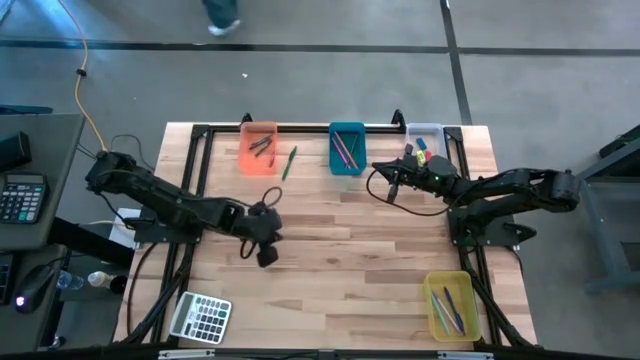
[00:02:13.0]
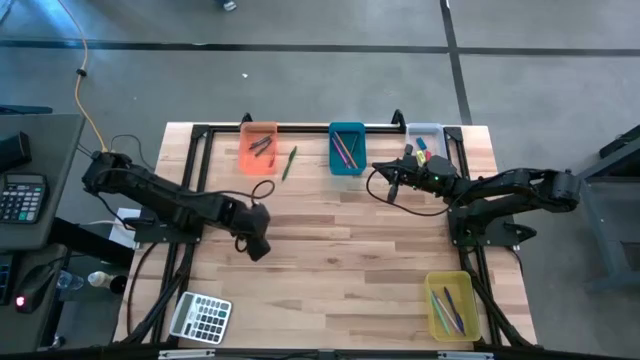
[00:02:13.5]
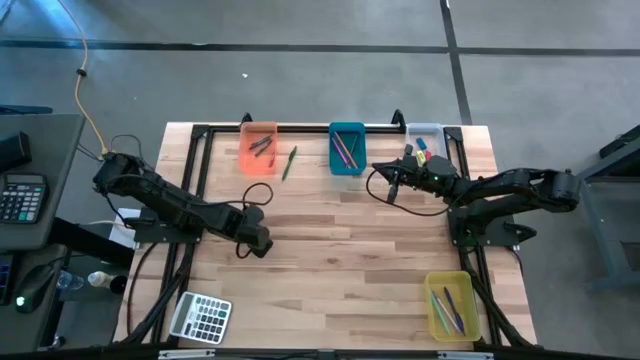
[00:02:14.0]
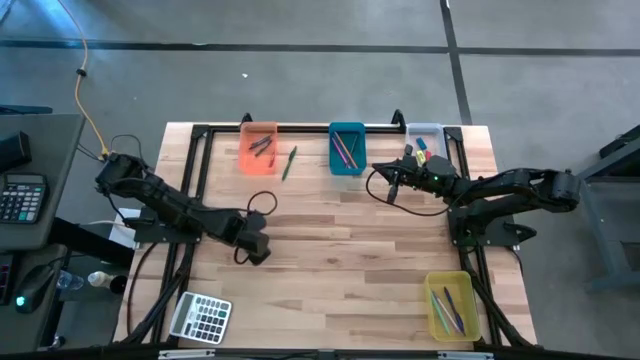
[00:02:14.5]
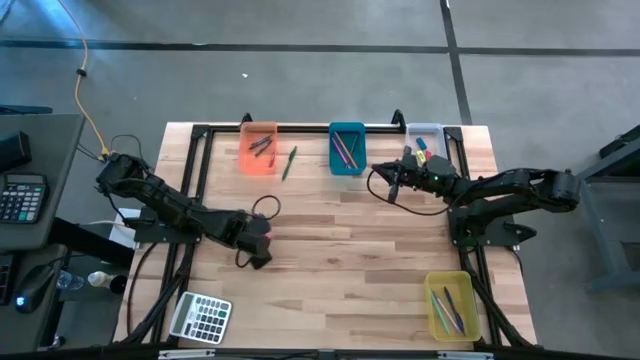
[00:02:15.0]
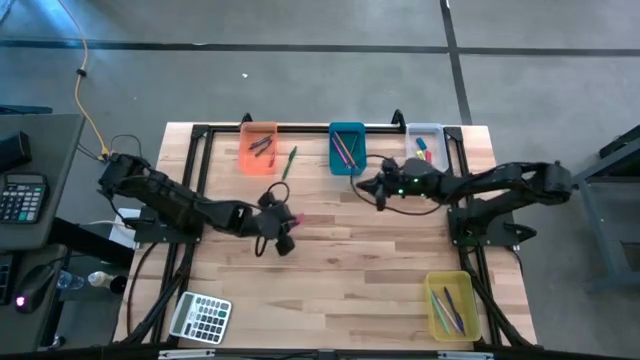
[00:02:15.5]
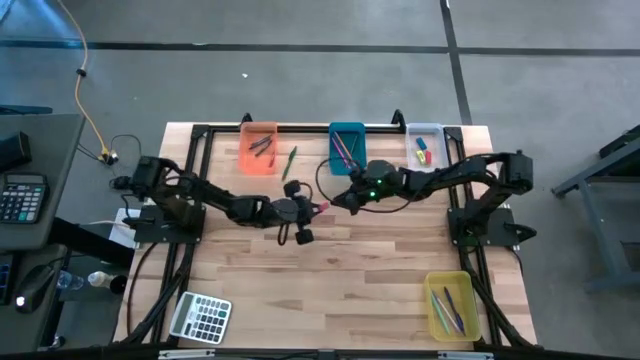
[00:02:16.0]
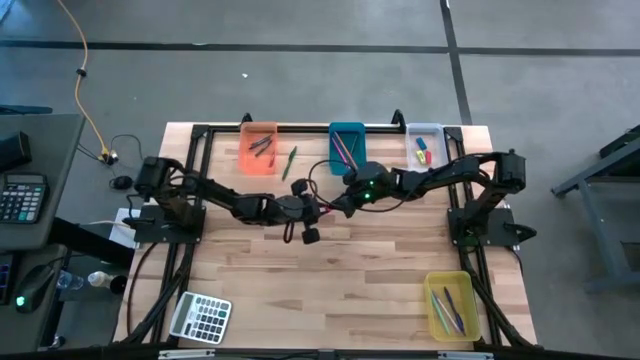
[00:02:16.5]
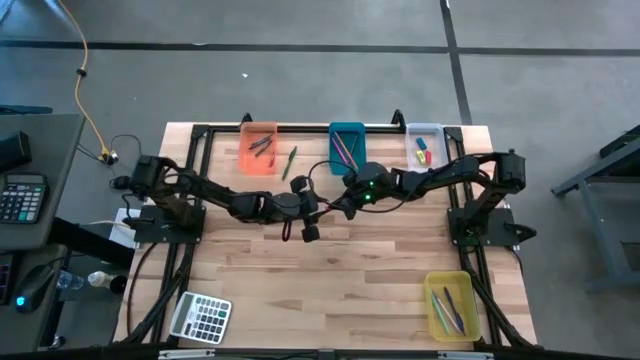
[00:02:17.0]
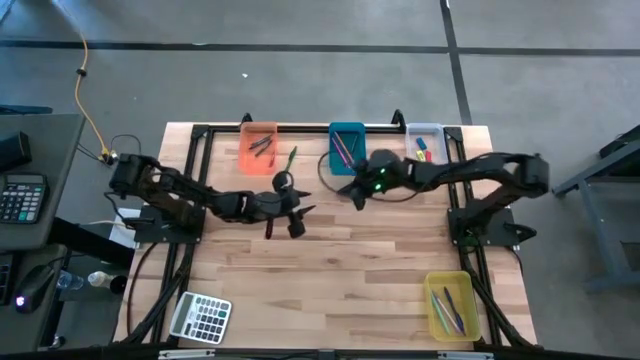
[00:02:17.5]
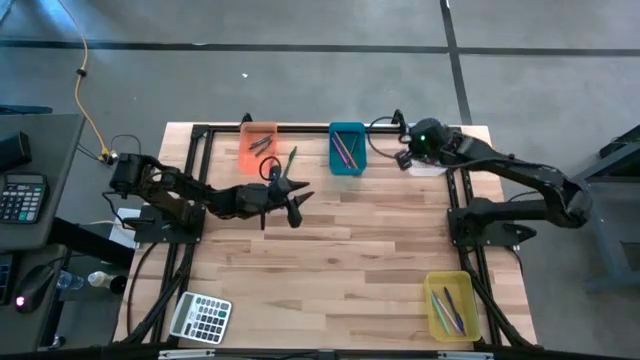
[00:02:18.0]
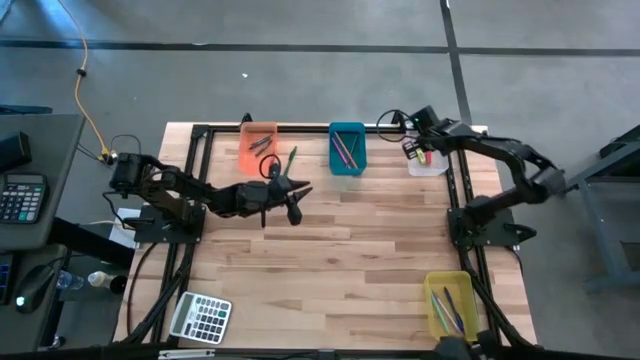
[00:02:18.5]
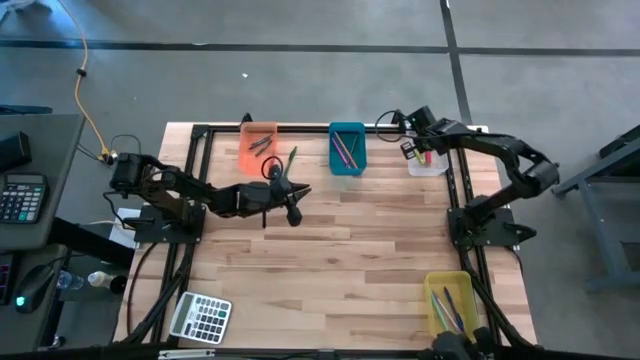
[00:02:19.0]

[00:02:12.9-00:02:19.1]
Task: Sort crayons/erasers/pens/pencils in bins
Put the pink eraser into the transparent bin

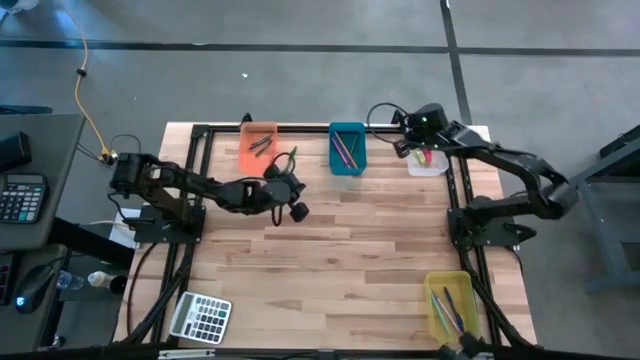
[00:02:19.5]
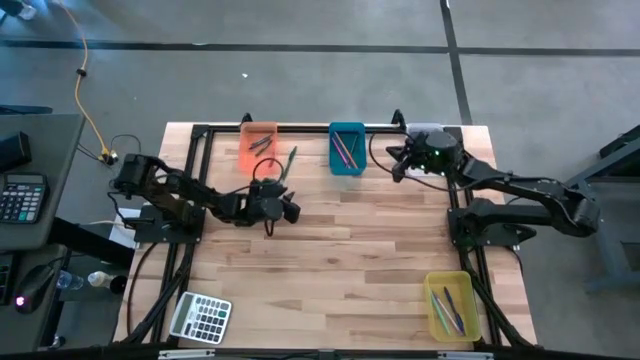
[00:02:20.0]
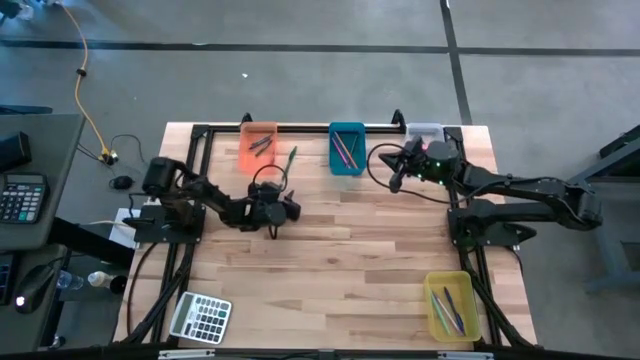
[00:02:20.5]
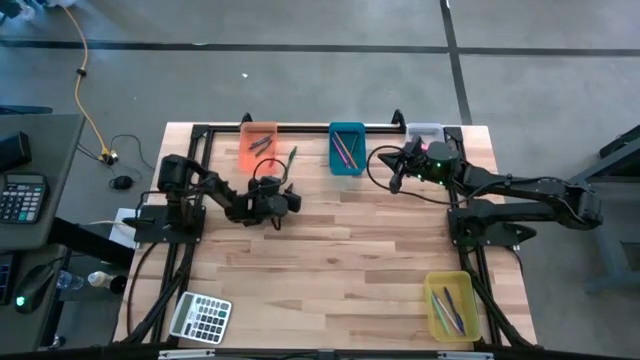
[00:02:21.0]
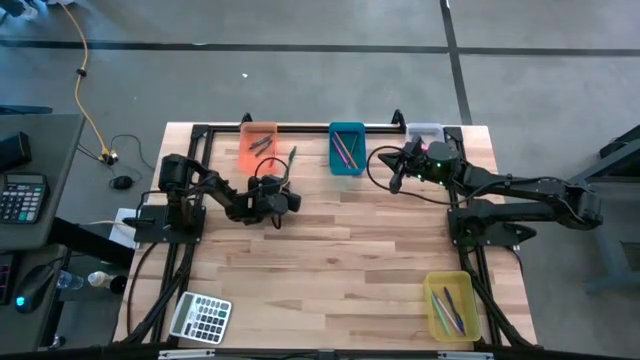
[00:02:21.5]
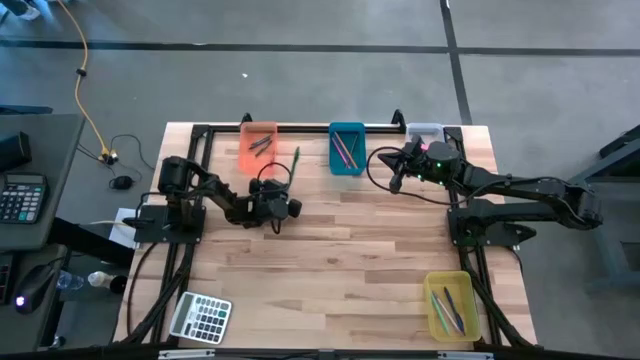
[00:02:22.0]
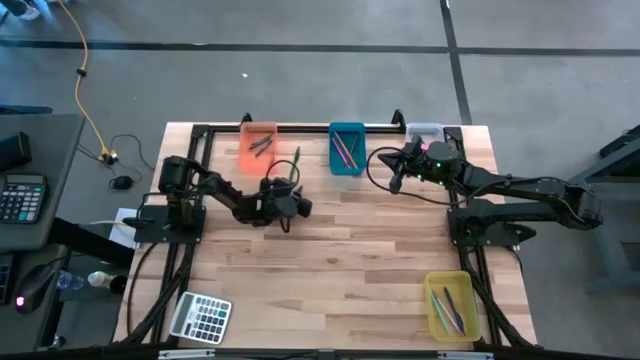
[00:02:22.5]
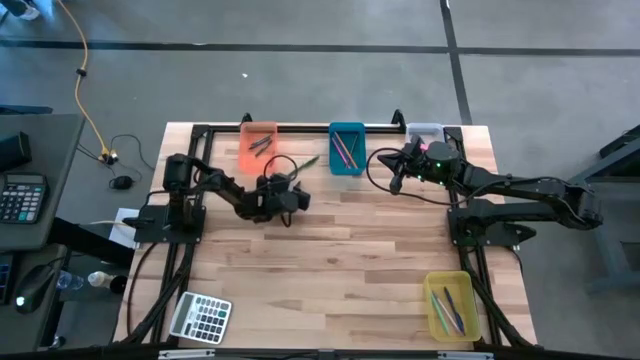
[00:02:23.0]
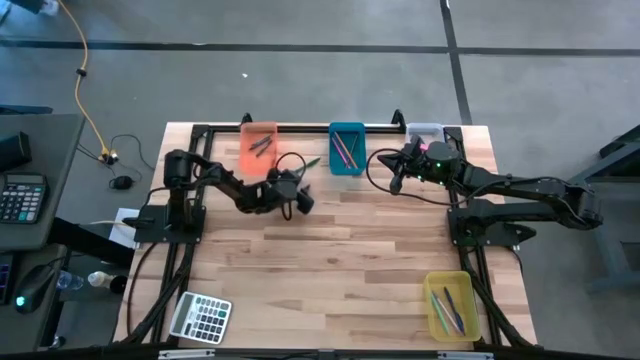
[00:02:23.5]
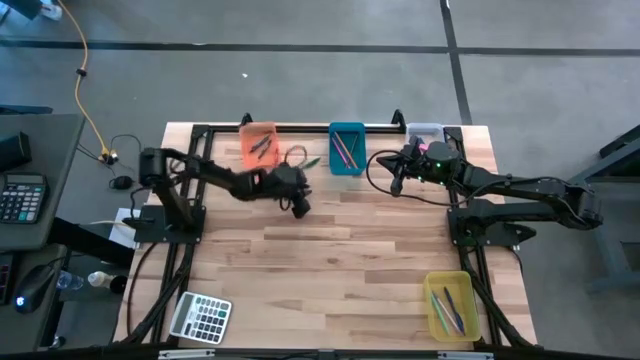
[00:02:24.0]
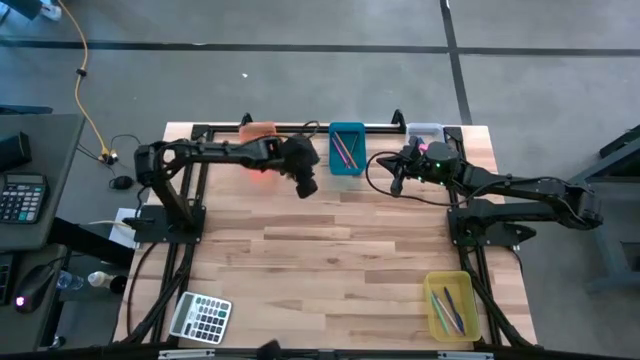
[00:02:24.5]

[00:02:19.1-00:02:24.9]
Put the green pen into the yellow transparent bin

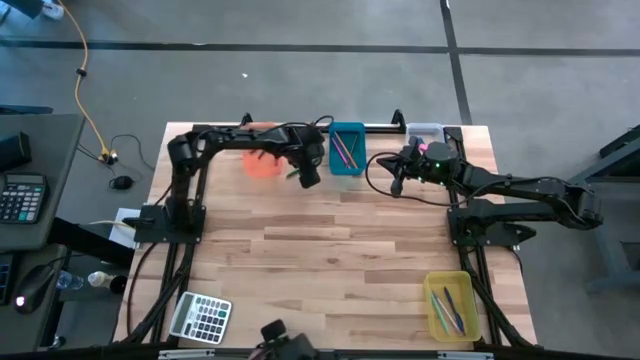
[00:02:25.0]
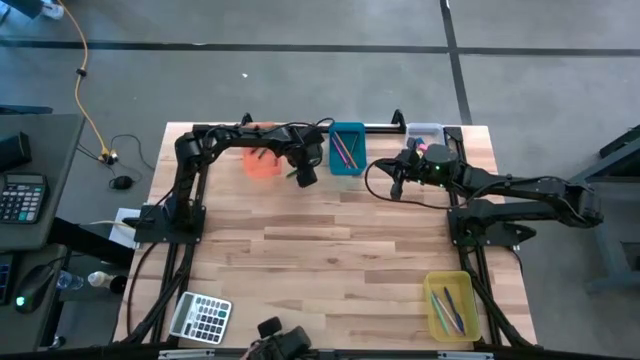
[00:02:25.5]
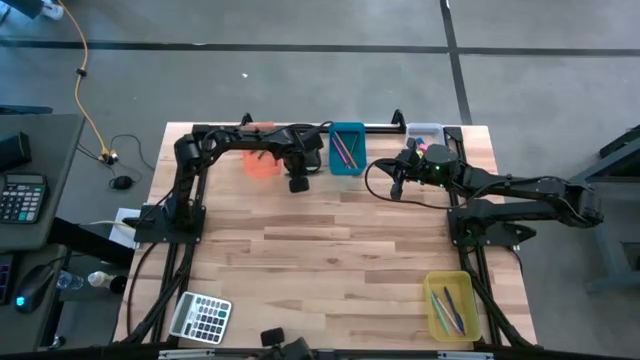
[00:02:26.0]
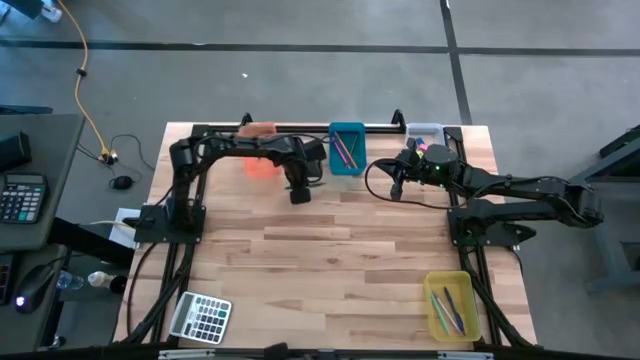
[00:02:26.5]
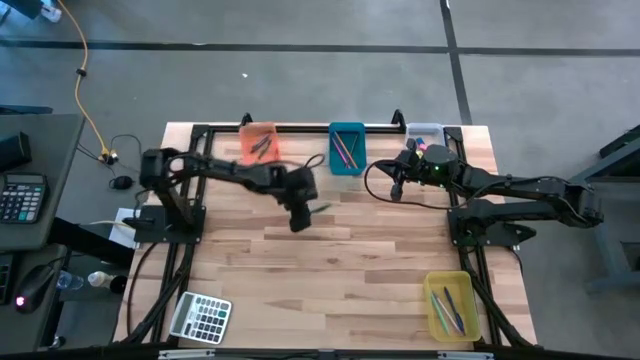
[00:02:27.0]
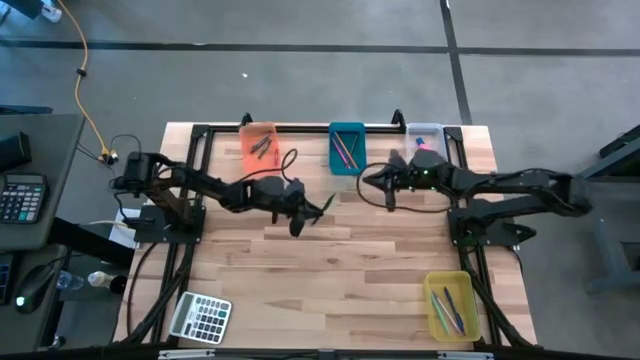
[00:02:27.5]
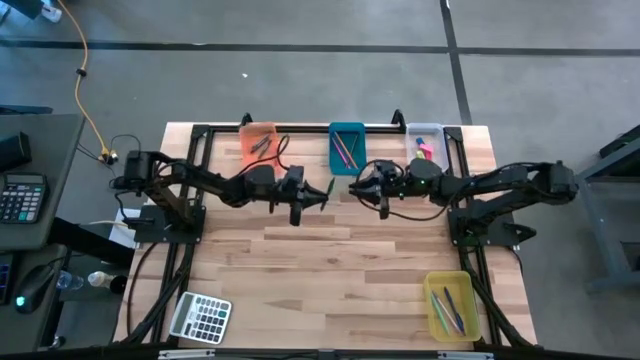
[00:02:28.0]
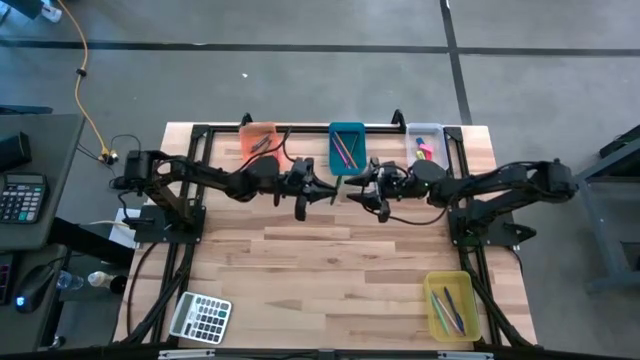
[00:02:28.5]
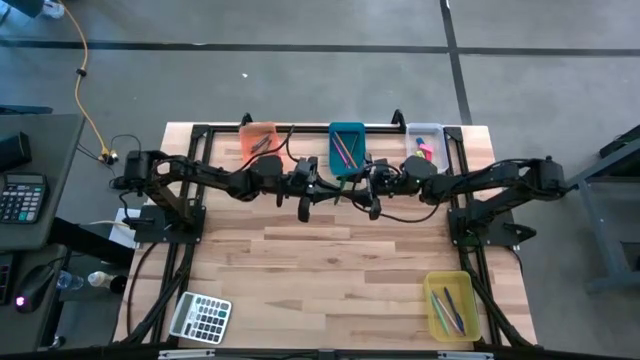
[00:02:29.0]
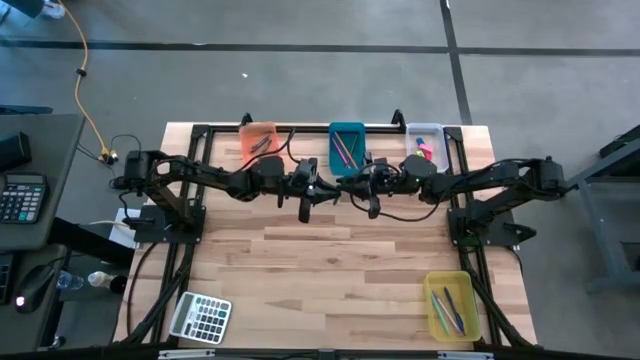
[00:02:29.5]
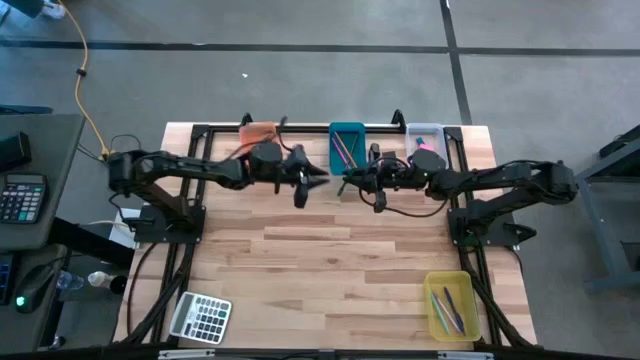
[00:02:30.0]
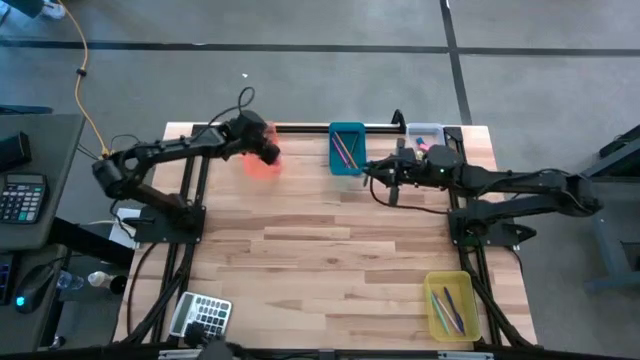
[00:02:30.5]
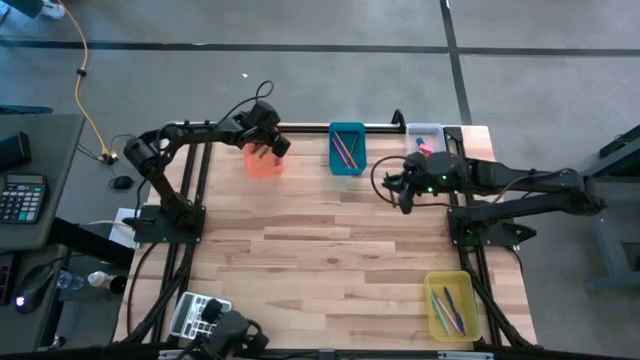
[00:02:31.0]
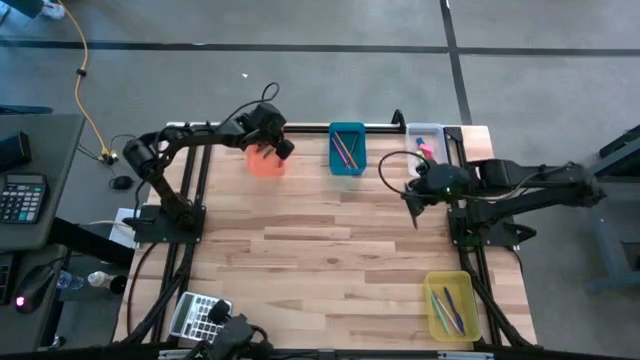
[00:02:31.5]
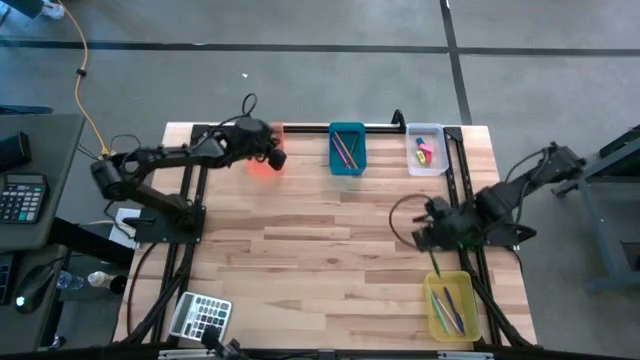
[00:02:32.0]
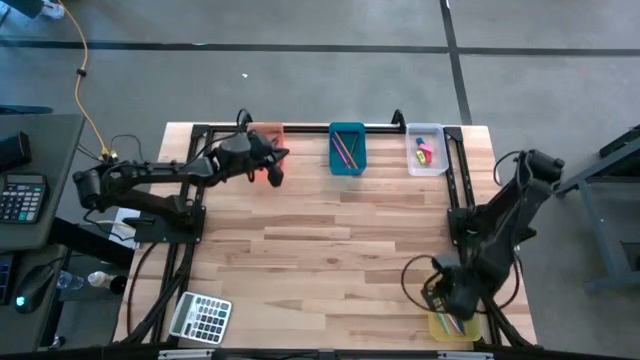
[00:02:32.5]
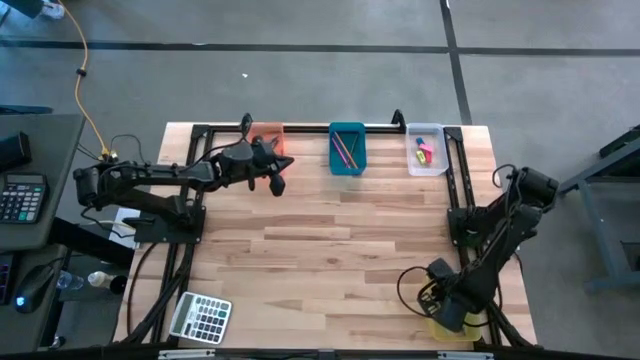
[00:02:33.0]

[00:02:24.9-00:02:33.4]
Put the green pen into the yellow bin

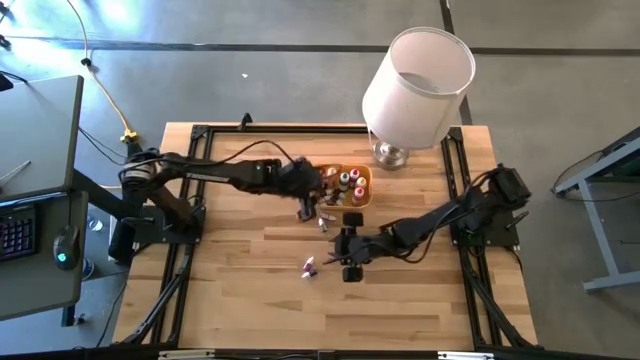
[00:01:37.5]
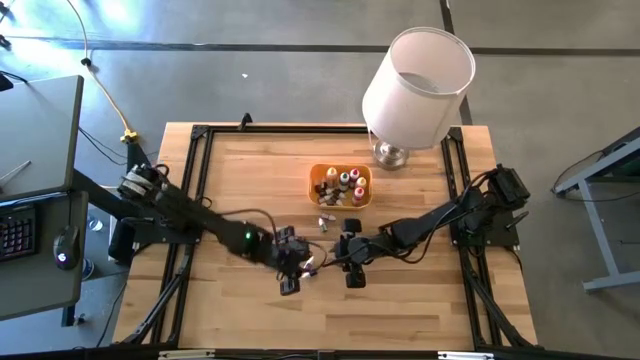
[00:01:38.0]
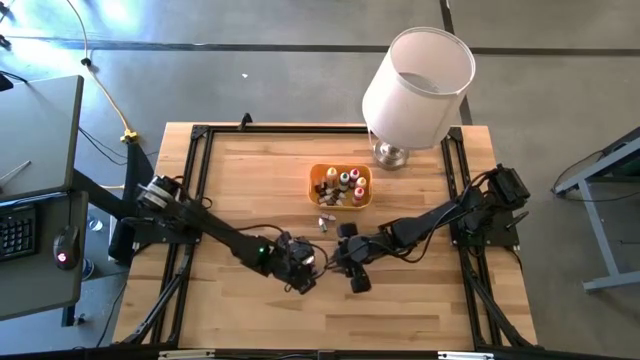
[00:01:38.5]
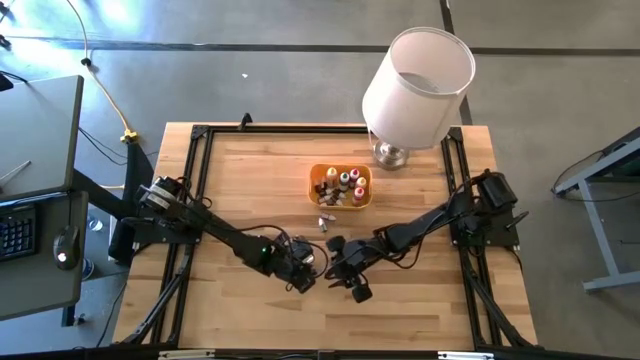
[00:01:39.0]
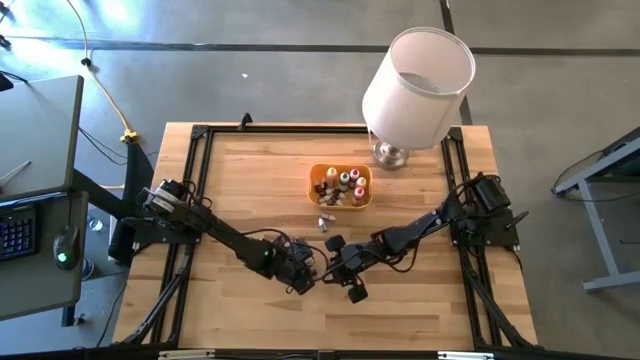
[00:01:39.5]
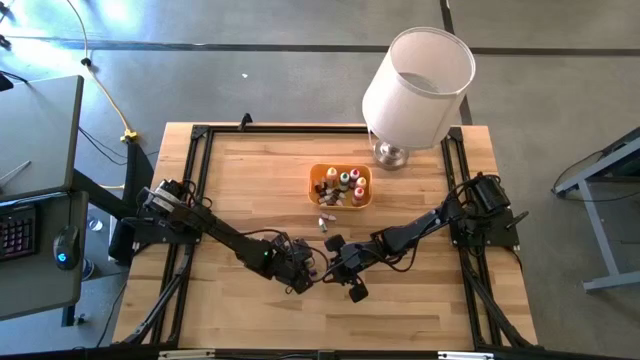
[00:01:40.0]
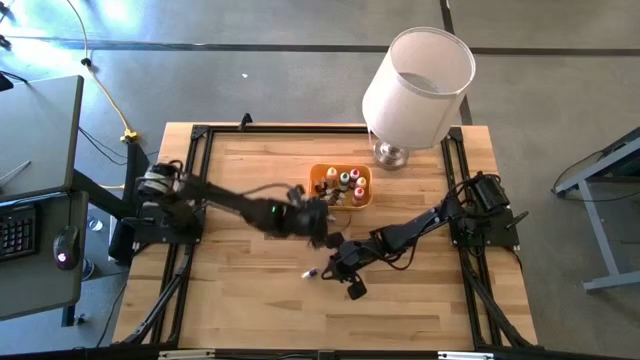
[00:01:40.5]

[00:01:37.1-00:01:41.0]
Task: Pick & Place food coloring
Put the small red food coloring bottle into the yellow container
